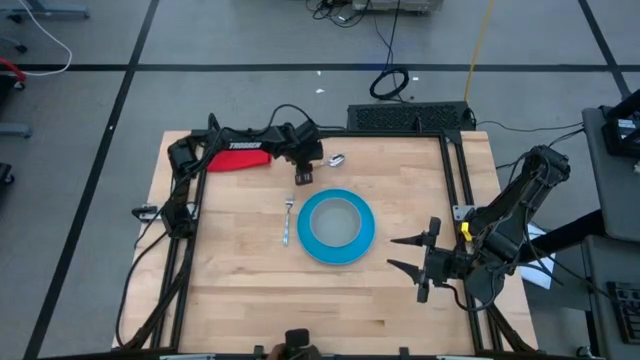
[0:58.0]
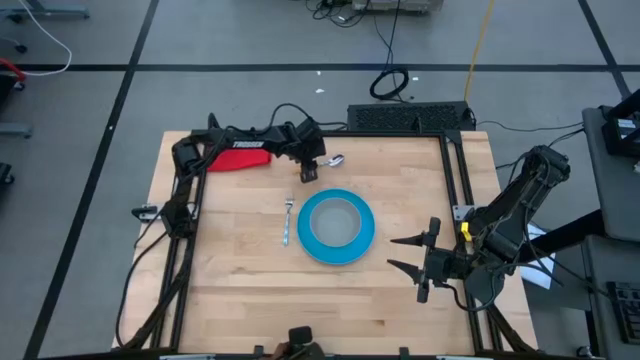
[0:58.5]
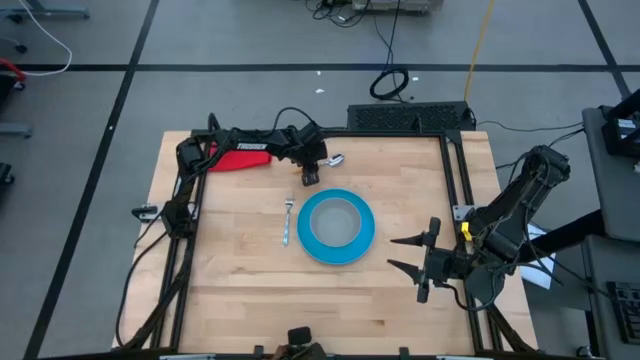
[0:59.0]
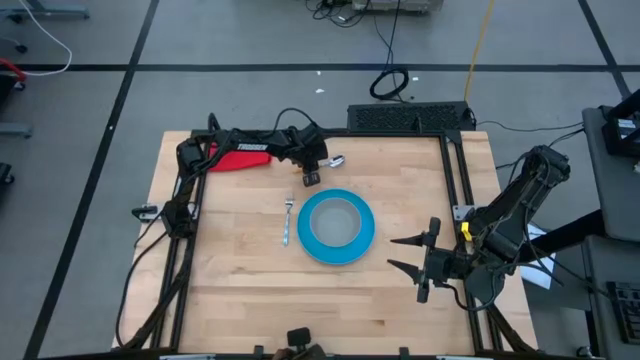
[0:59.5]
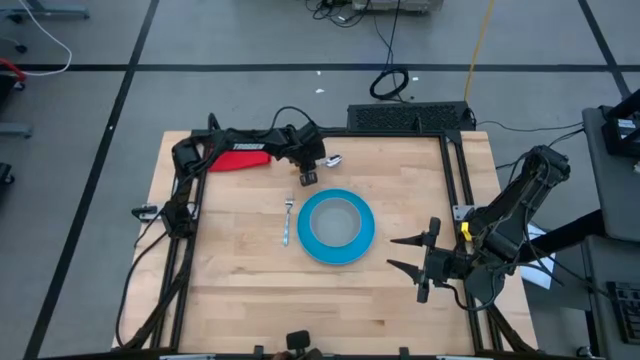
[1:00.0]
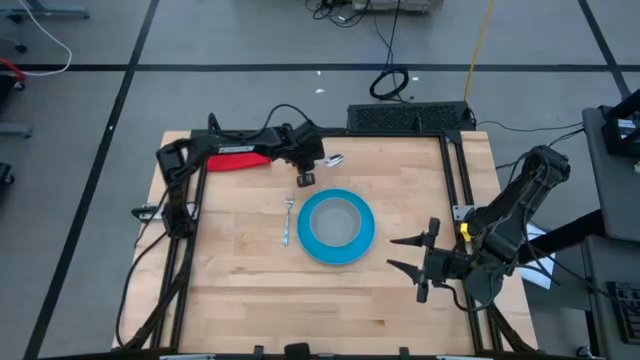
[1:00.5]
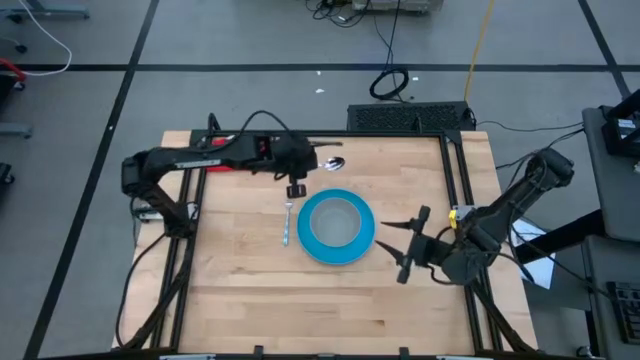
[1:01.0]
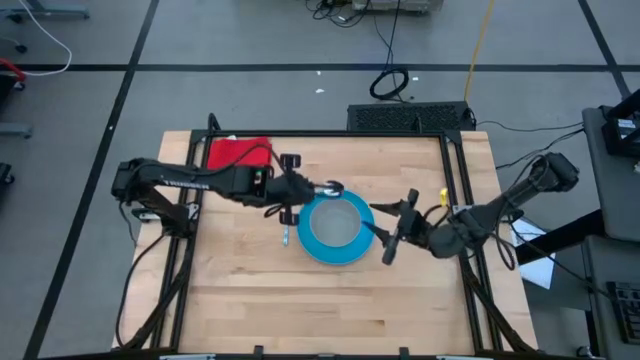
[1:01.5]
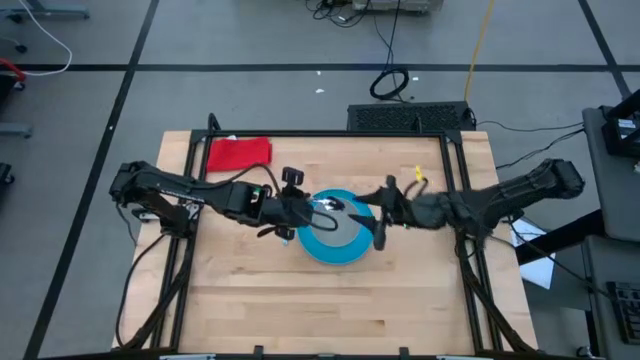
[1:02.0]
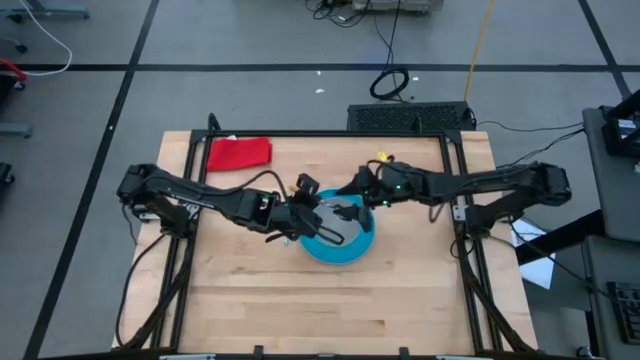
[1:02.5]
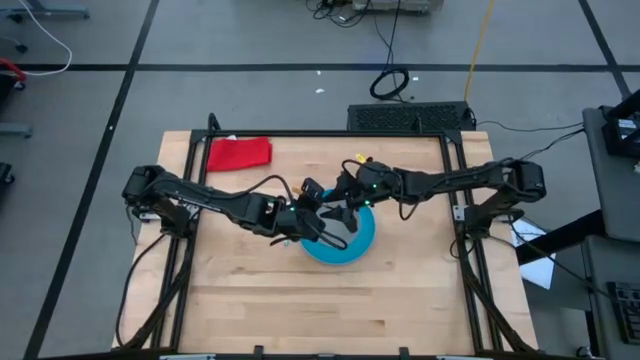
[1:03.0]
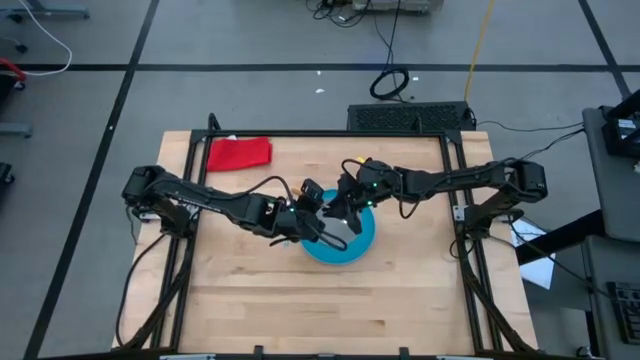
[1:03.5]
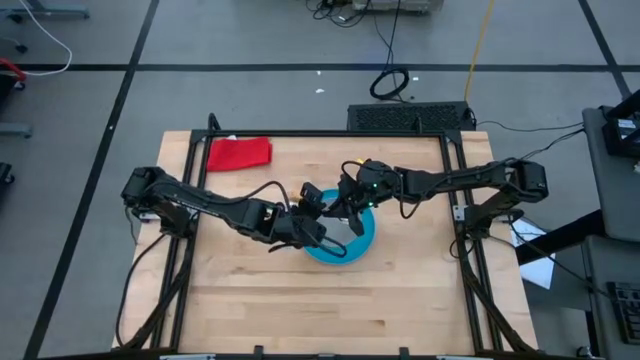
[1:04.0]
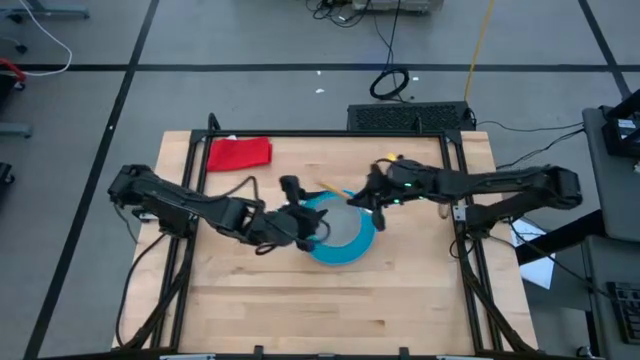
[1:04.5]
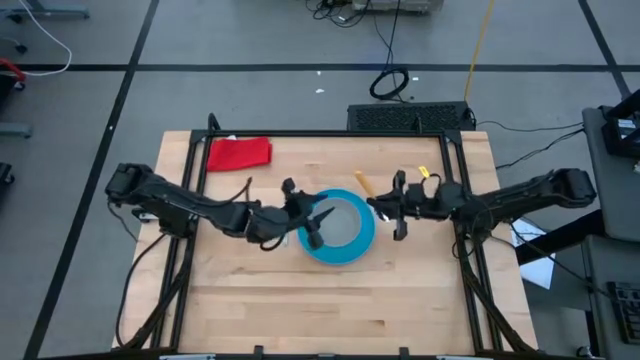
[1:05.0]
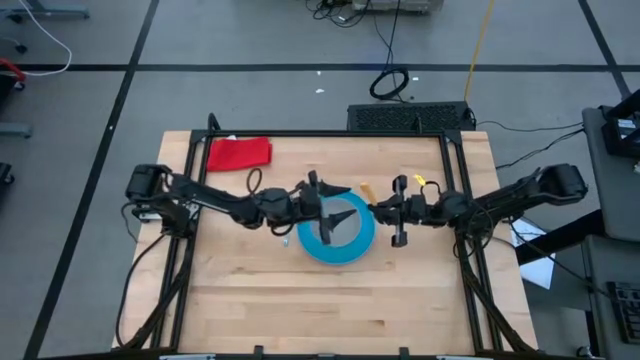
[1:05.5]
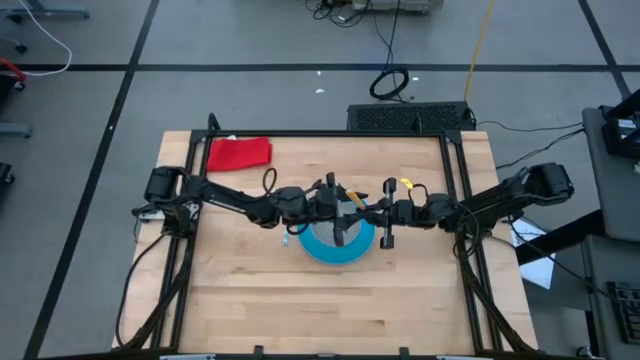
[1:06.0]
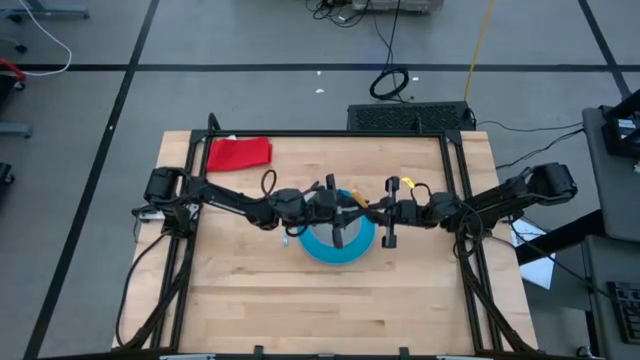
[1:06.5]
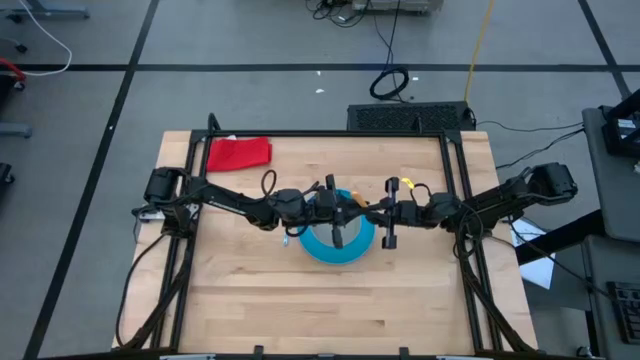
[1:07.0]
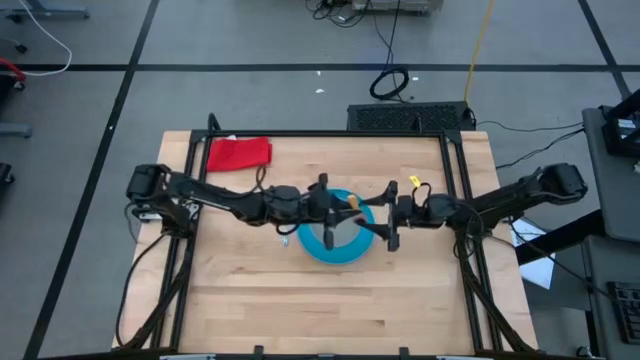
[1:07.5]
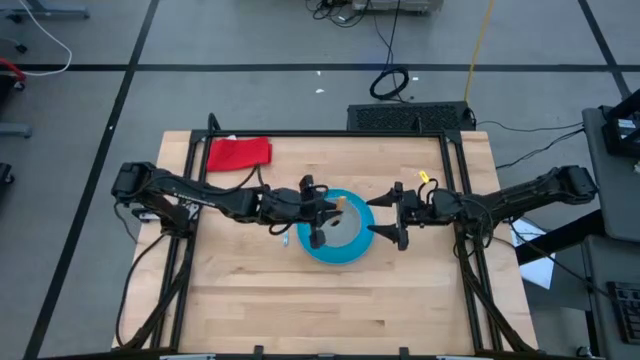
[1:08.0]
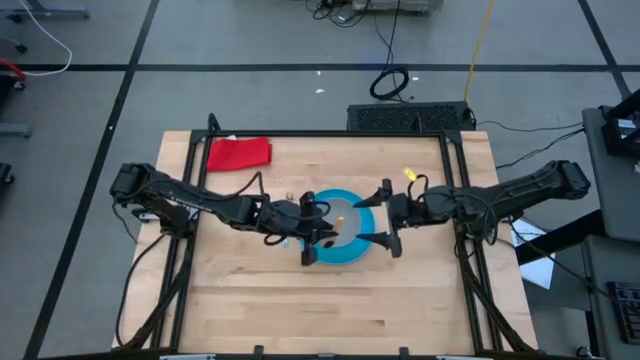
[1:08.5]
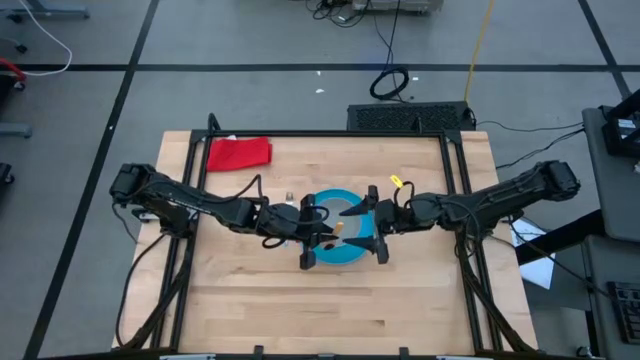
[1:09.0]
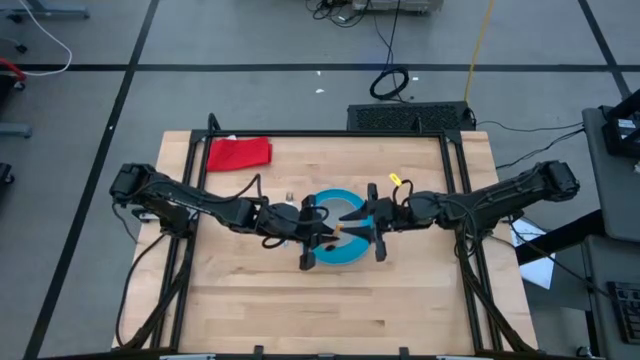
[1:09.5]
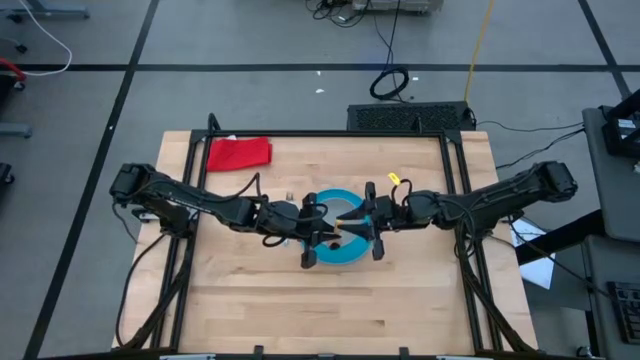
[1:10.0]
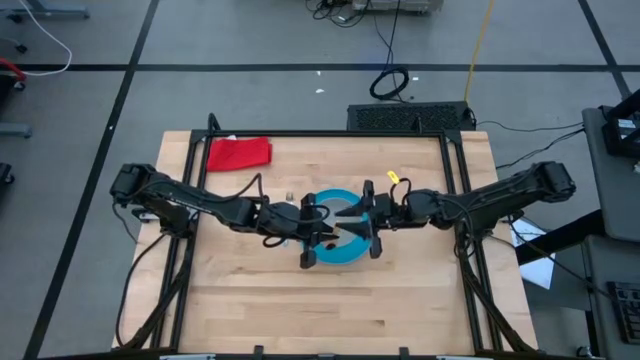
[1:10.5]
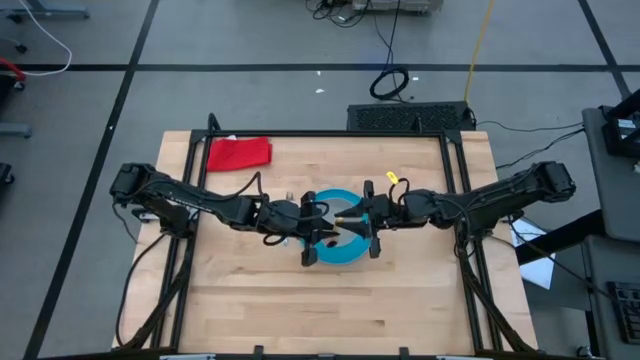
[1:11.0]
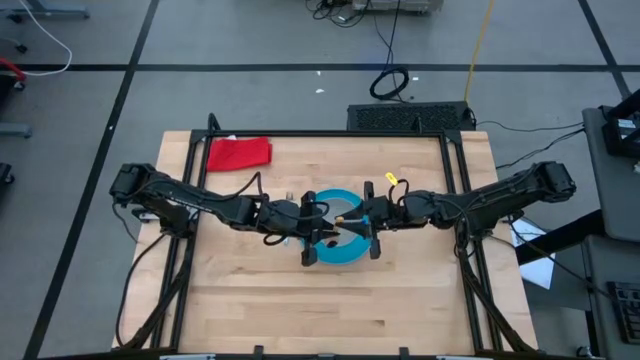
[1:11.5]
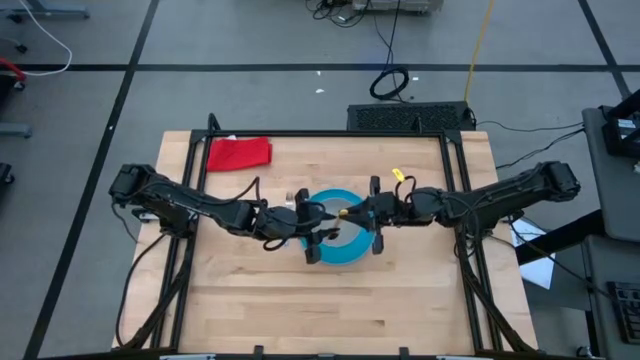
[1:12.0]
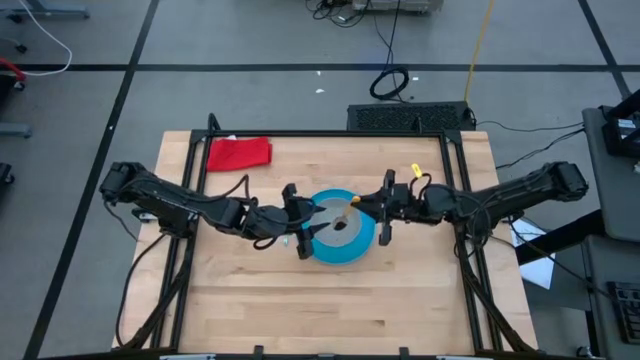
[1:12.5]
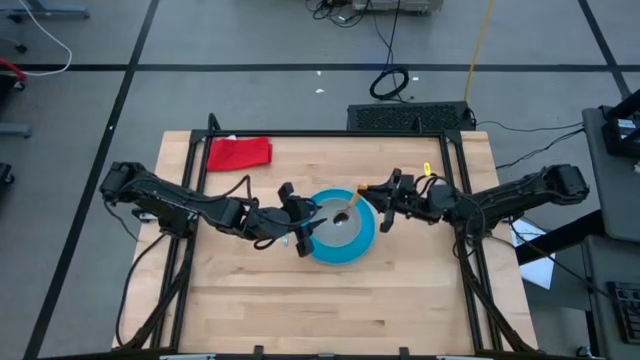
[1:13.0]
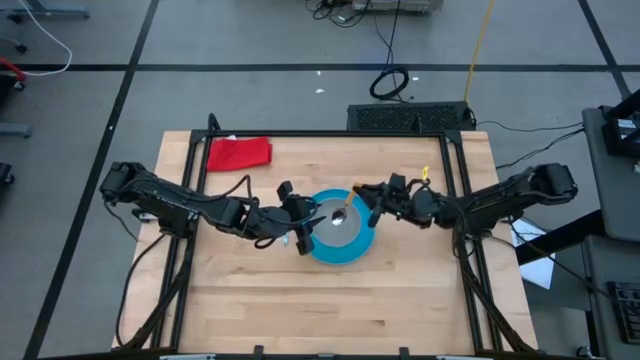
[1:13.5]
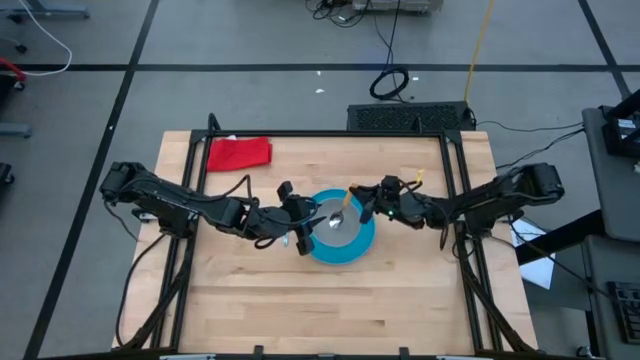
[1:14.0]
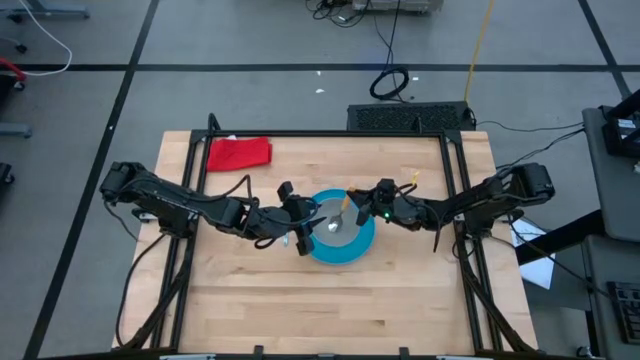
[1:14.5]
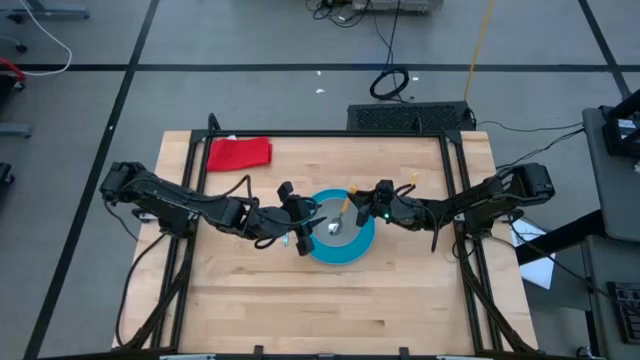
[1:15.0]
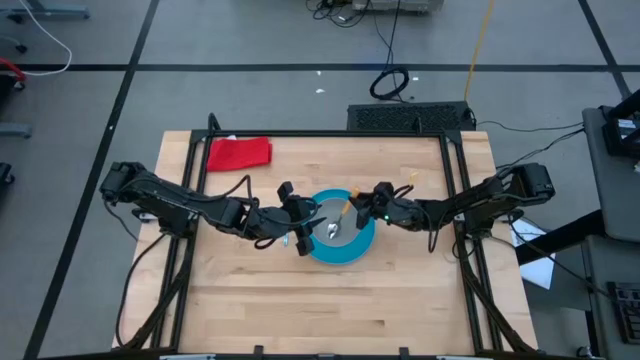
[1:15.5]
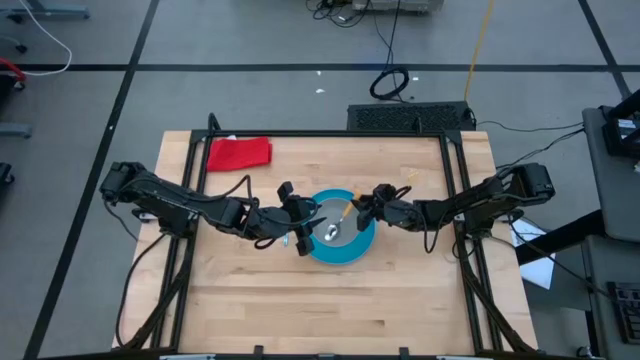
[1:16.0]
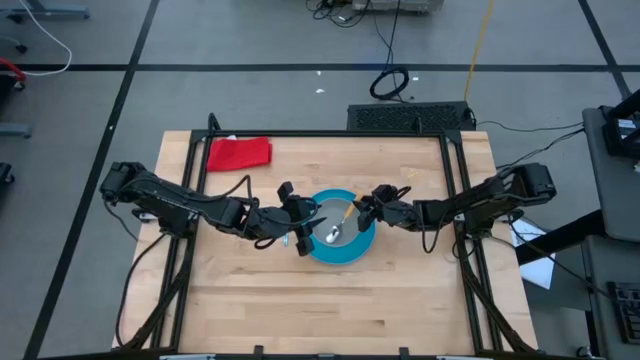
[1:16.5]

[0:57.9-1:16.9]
Task: Set table place
Put the orange spoon into the gray bowl

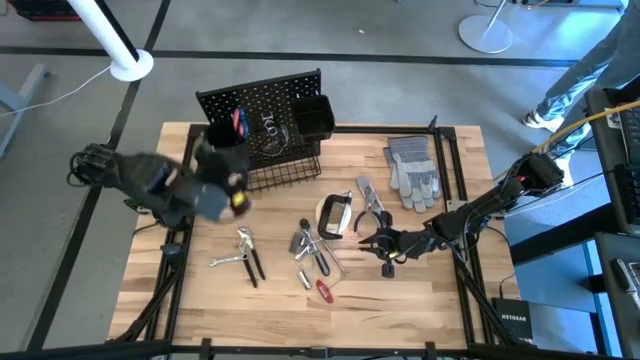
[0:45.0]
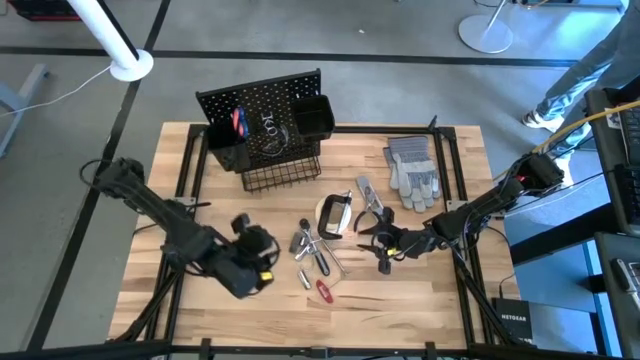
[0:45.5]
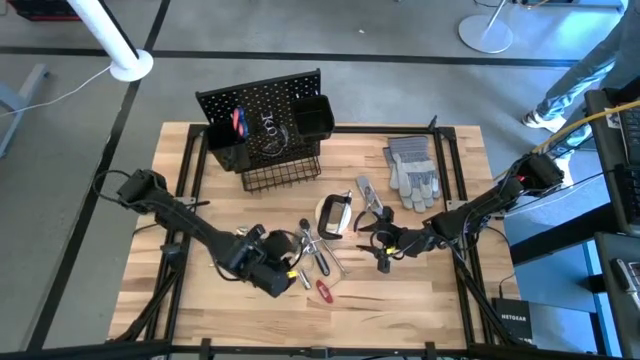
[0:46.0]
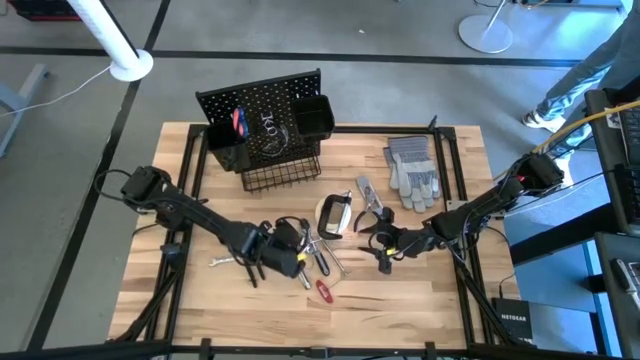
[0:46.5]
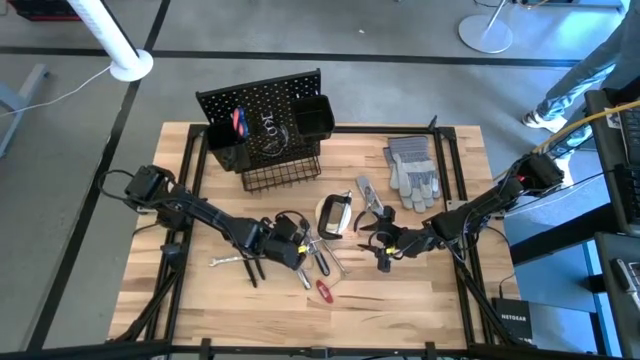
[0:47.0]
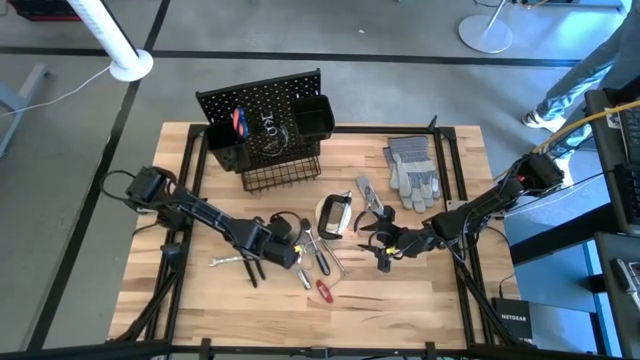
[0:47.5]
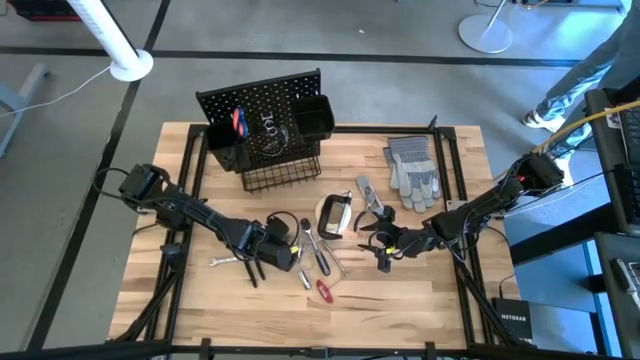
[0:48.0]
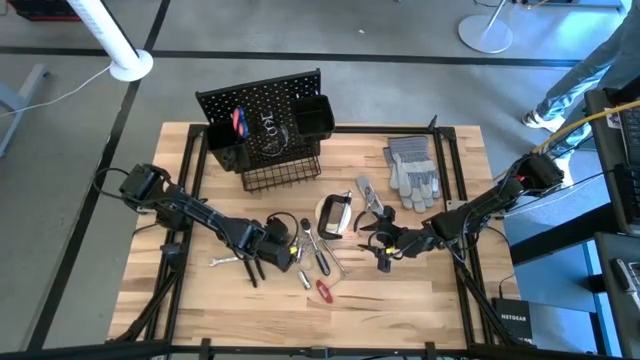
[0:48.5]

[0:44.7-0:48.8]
Task: Hang tools onto peg board
Put the blade dispenser into the right black bin on the pegboard
